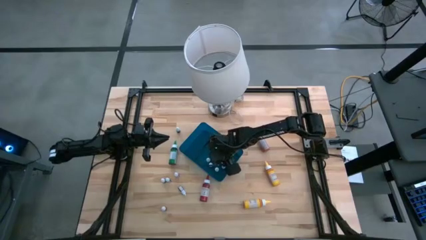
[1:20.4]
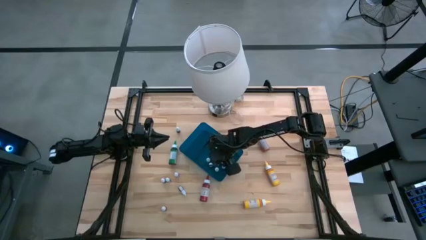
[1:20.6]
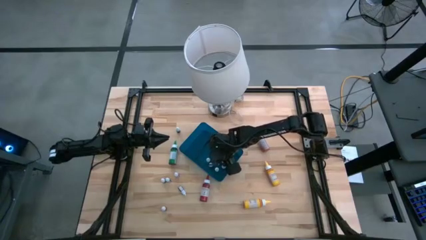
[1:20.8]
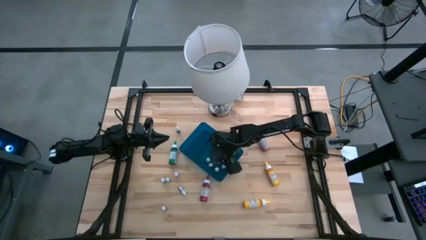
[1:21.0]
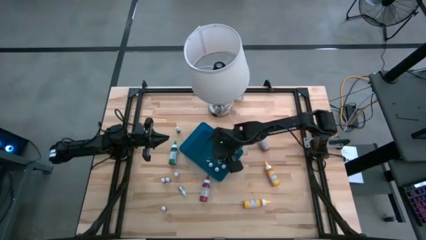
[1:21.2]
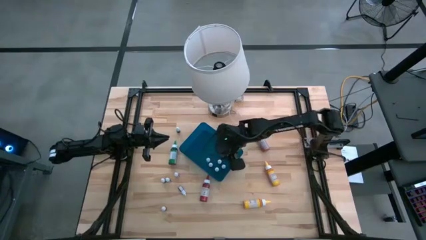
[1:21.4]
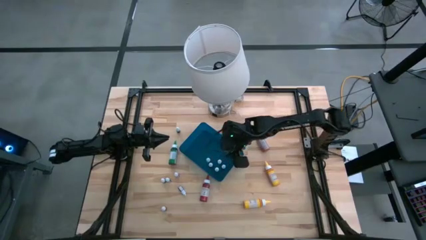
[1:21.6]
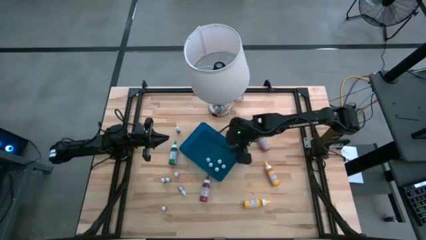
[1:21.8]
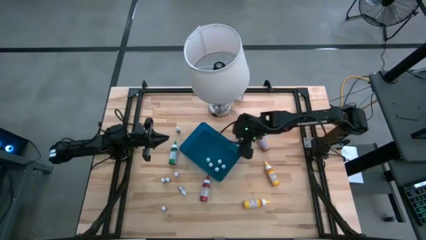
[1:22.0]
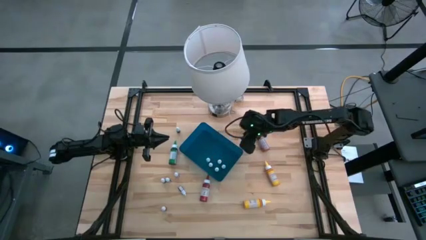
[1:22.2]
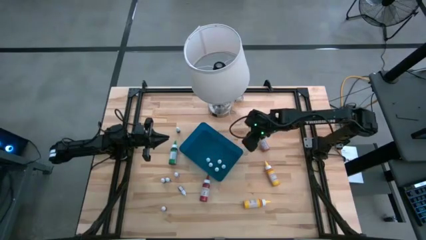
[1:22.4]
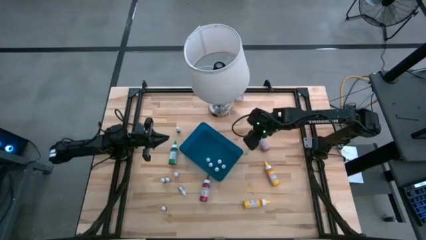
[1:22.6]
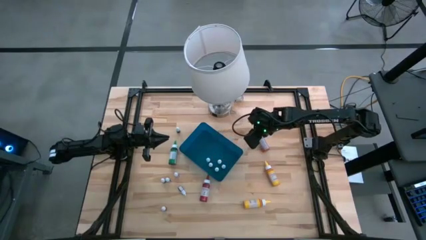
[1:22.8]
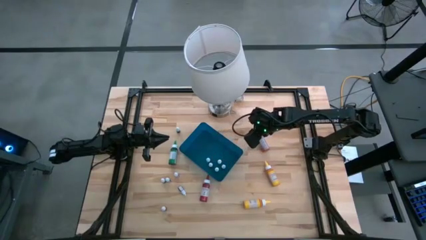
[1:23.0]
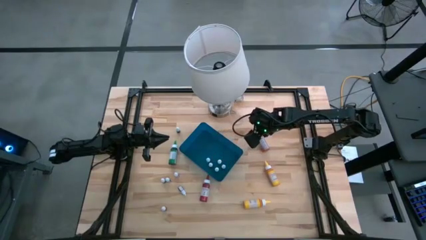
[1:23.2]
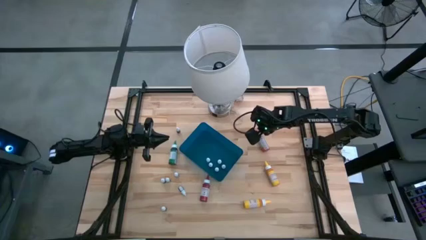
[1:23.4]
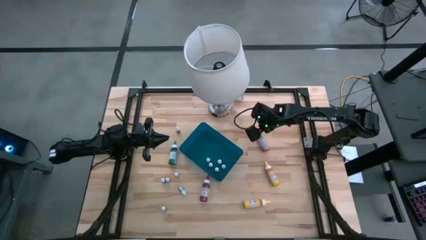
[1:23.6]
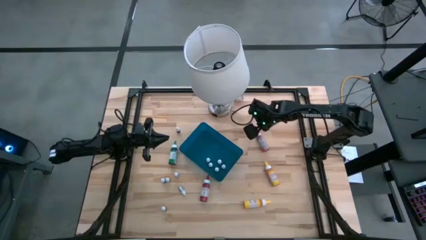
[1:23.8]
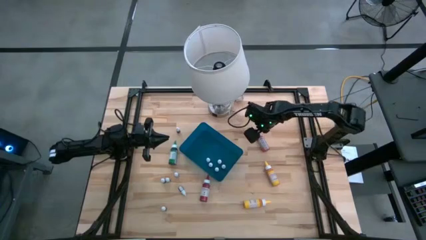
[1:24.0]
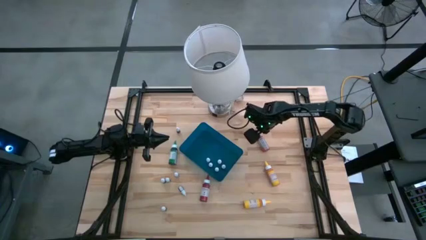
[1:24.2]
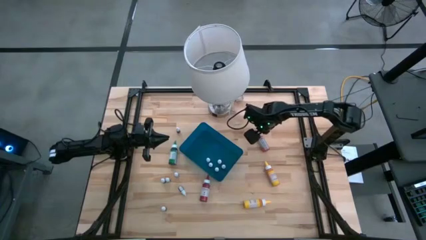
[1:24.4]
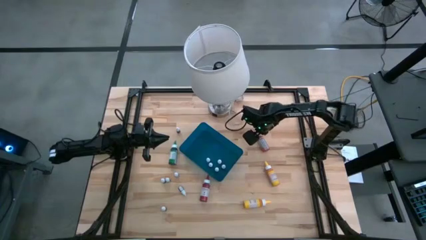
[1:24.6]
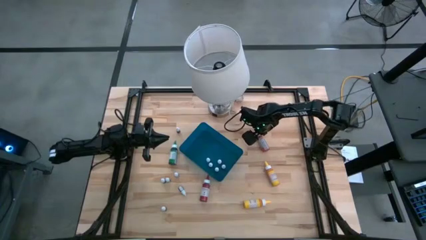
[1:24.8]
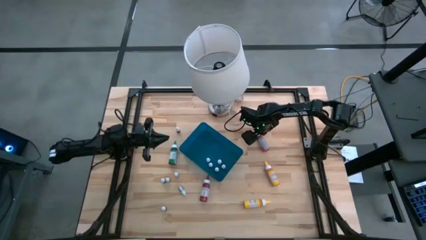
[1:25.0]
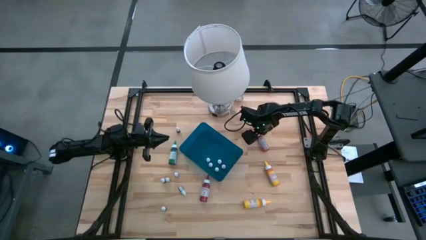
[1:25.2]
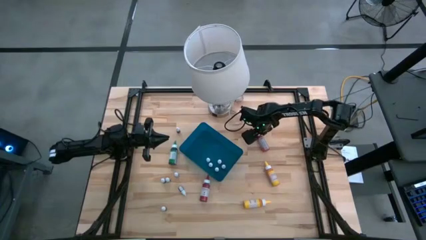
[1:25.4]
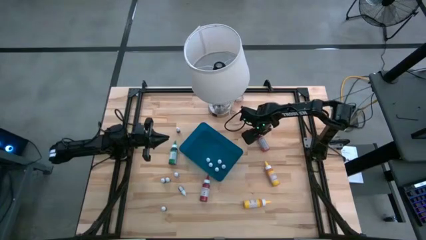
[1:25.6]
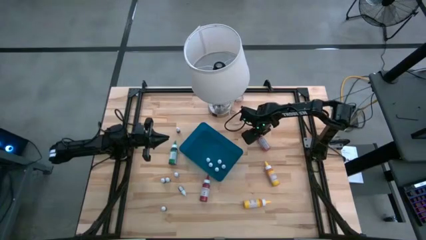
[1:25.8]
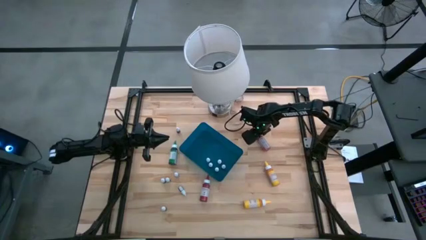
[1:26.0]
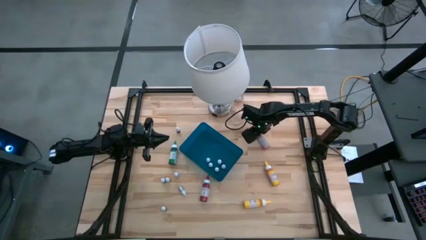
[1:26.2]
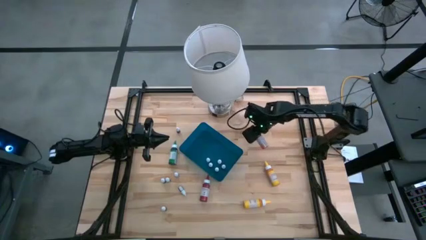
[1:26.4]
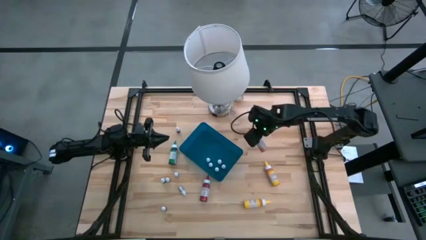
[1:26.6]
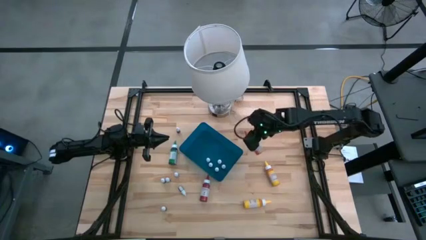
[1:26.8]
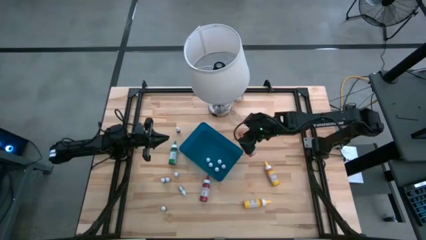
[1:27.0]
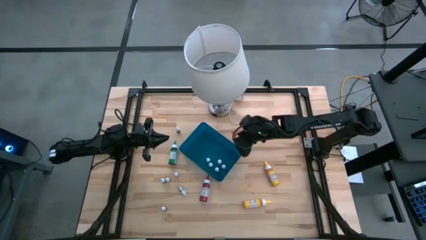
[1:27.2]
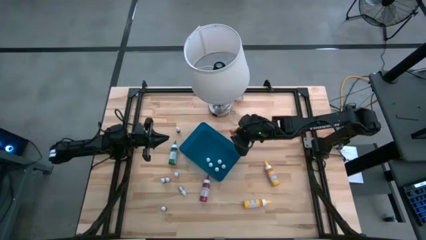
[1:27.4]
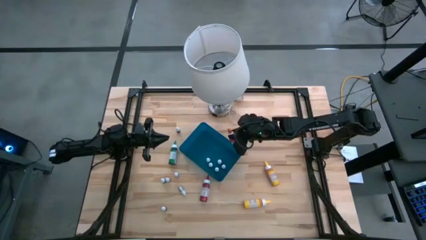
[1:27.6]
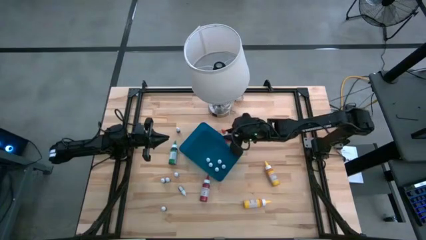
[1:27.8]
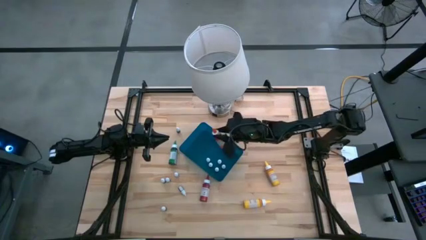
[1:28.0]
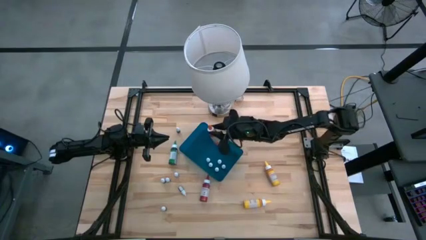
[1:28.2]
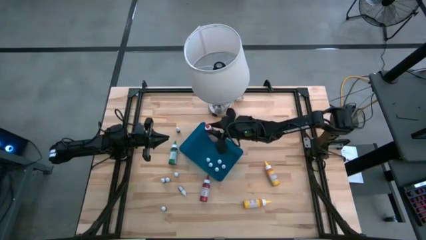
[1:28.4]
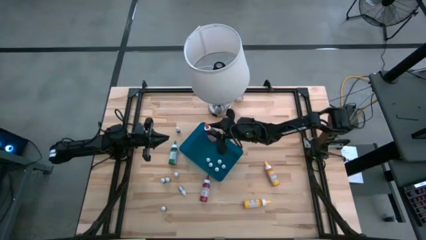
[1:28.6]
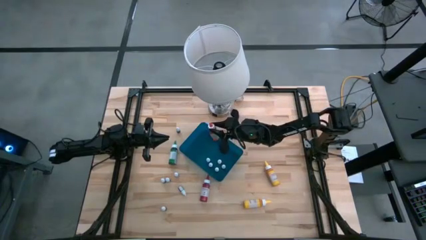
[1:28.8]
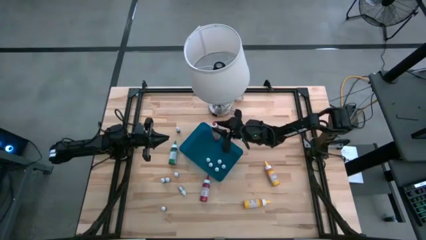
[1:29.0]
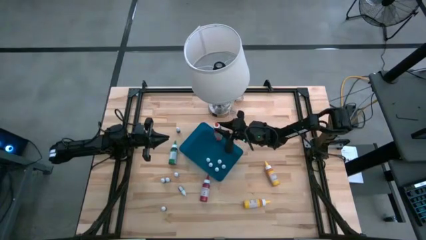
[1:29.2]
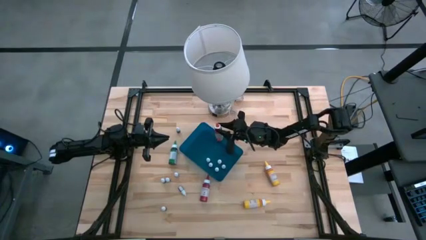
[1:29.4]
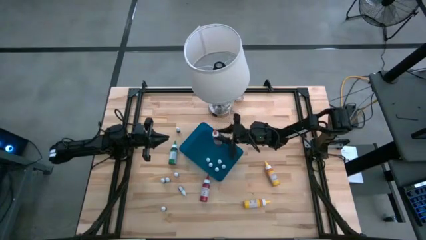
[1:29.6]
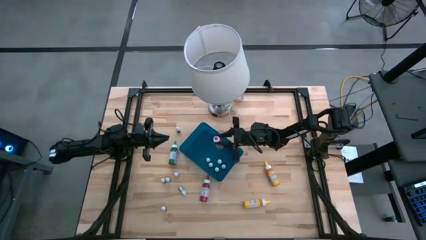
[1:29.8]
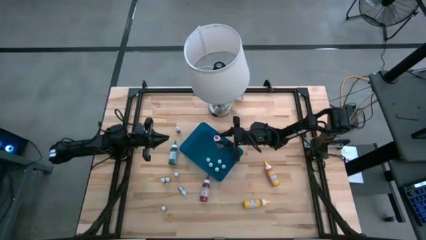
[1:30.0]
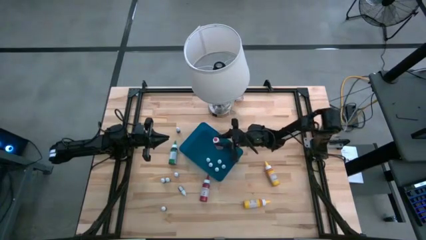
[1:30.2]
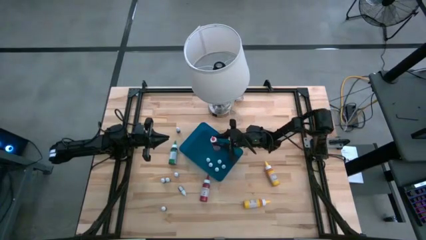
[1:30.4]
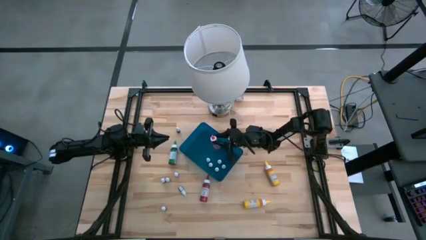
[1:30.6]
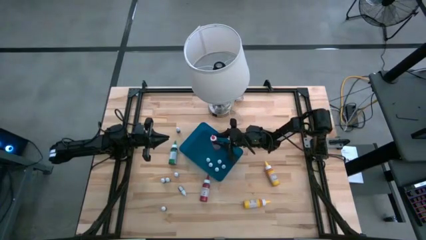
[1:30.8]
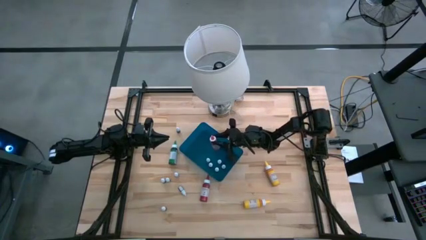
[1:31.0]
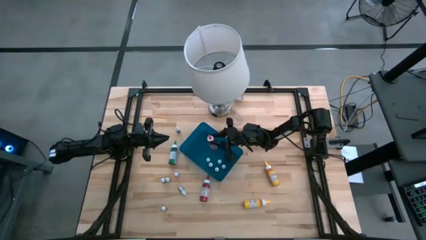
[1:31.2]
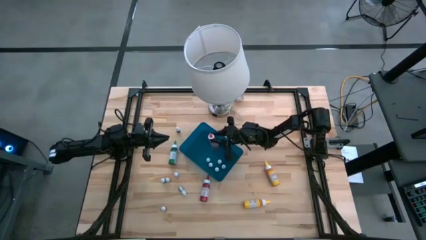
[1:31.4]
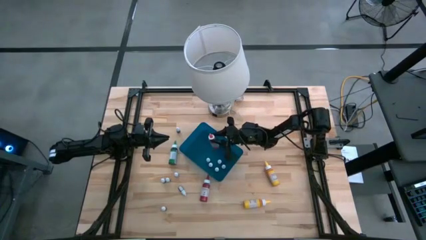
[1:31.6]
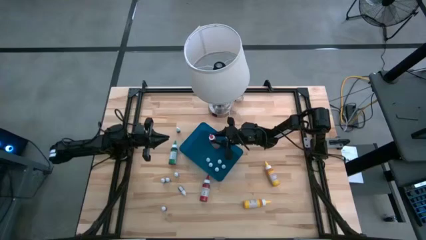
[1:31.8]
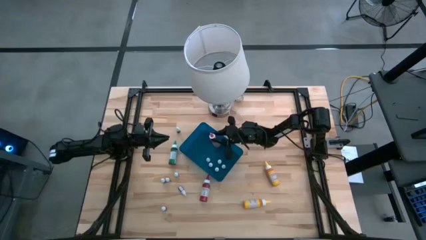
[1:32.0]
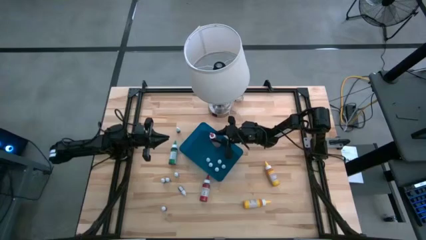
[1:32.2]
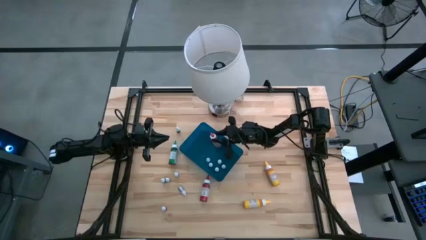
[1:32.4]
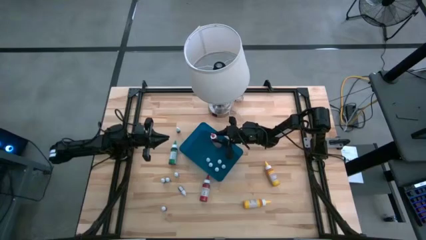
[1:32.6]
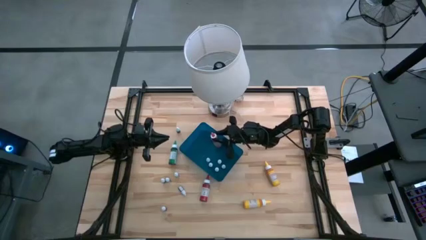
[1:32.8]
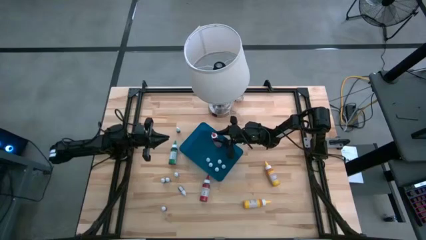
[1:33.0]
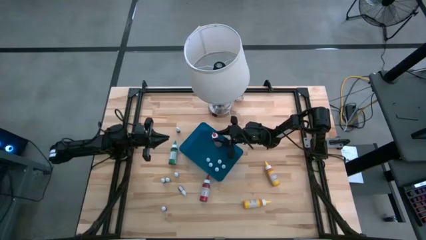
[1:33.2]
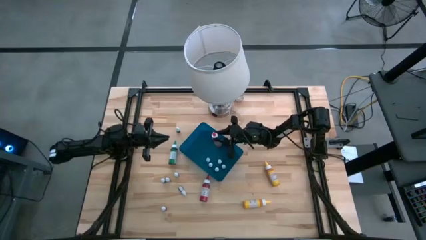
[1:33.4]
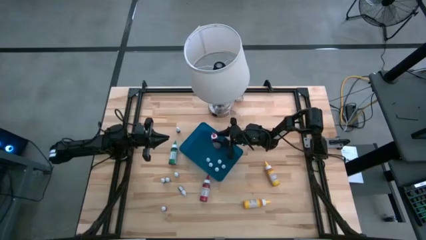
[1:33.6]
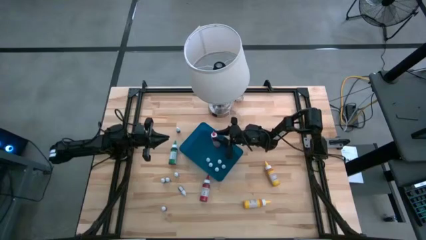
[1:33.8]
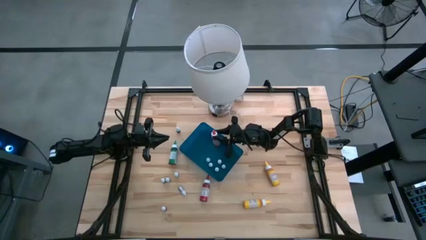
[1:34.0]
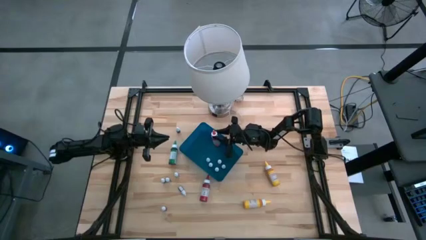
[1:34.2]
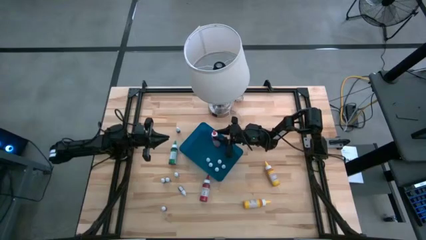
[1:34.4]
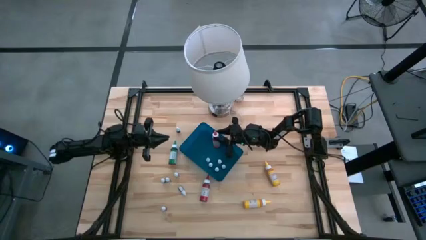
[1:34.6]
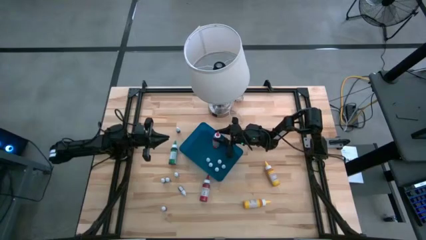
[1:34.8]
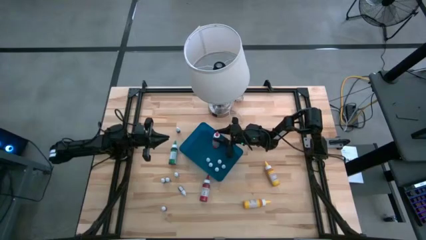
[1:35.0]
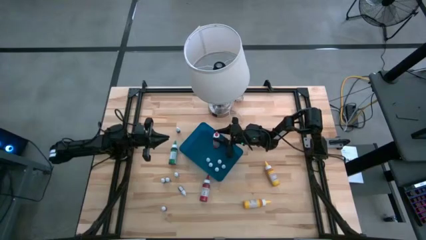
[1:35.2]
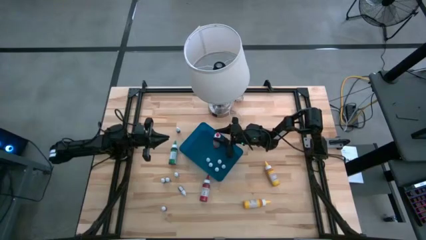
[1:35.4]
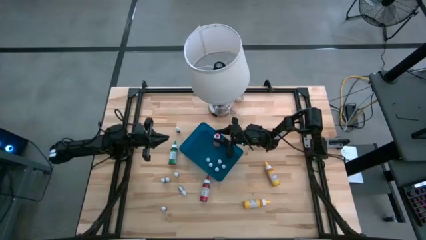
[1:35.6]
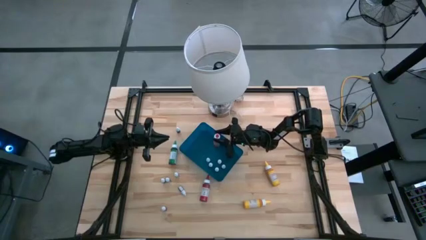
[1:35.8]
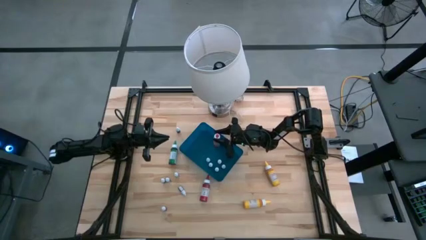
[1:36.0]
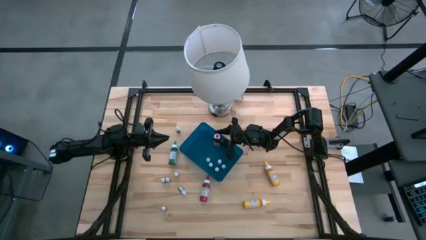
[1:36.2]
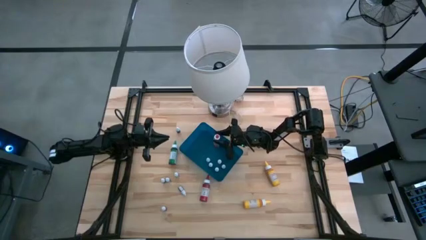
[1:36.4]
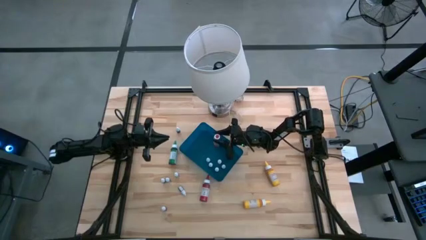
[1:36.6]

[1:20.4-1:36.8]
Task: Pick & Place food coloring
Put the large orange food coloring bottle into the blue container
